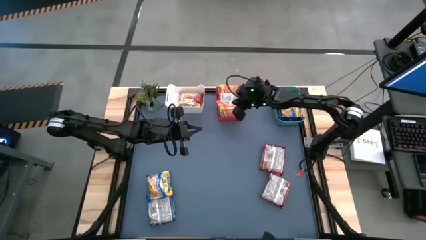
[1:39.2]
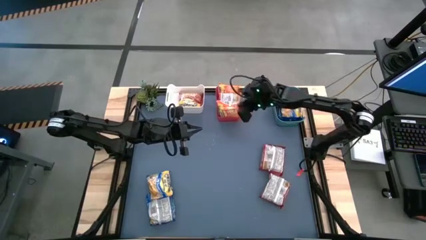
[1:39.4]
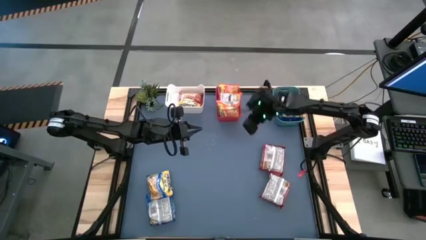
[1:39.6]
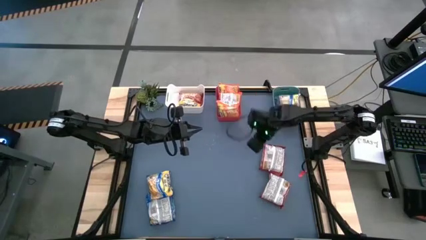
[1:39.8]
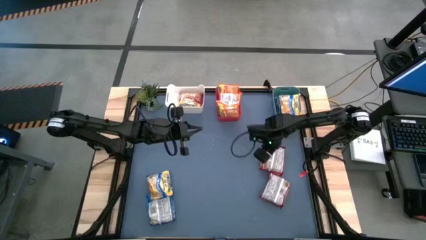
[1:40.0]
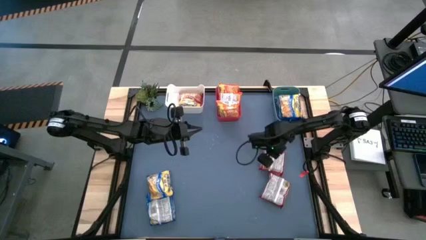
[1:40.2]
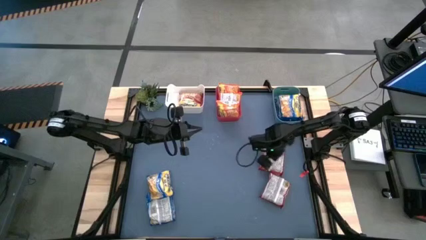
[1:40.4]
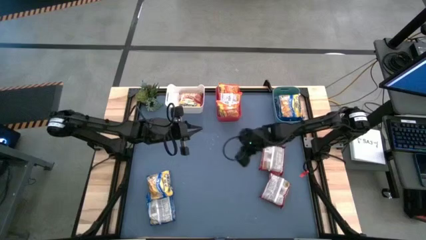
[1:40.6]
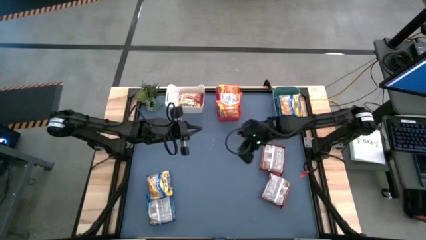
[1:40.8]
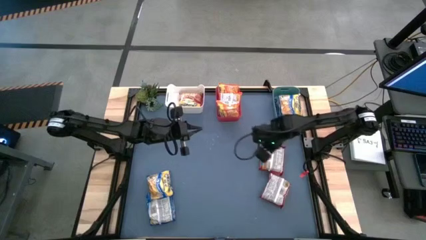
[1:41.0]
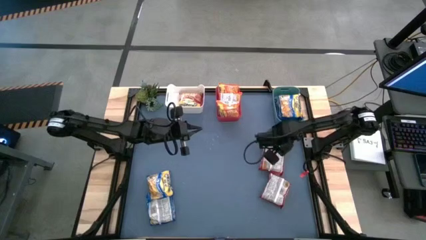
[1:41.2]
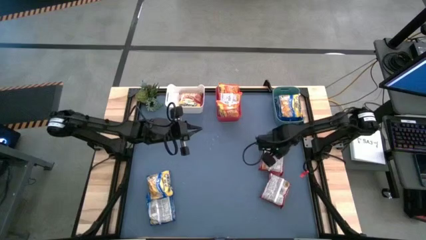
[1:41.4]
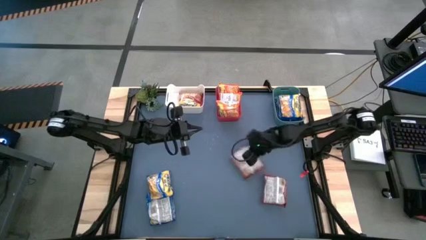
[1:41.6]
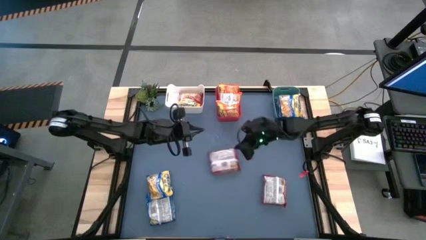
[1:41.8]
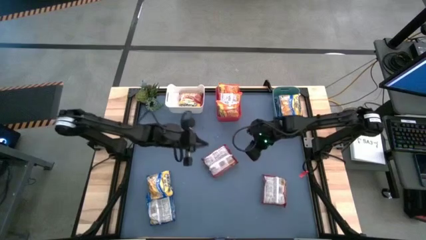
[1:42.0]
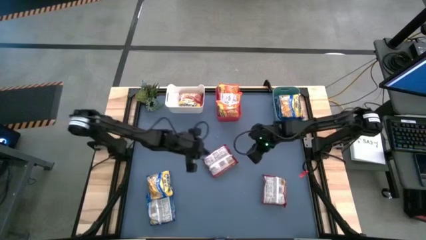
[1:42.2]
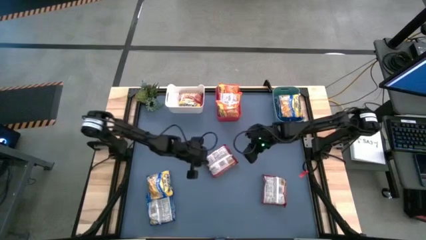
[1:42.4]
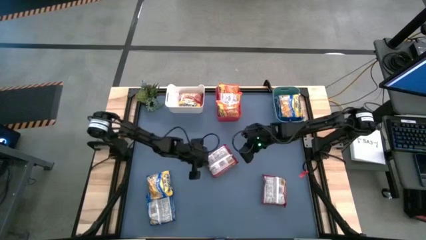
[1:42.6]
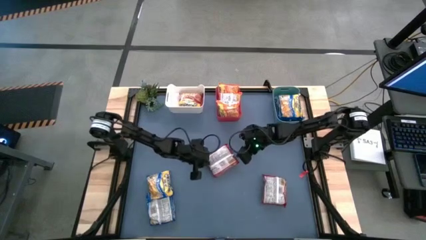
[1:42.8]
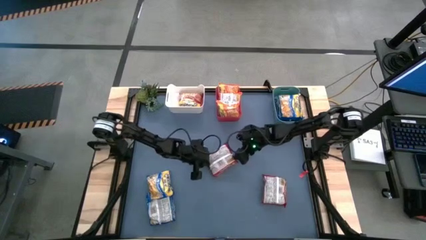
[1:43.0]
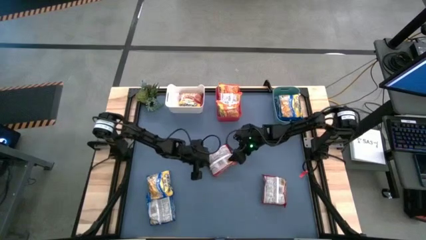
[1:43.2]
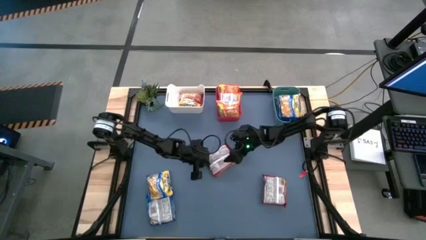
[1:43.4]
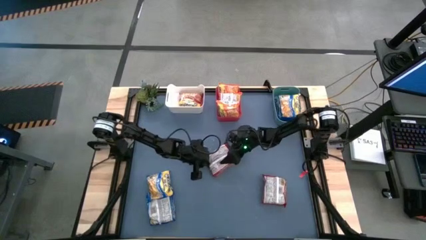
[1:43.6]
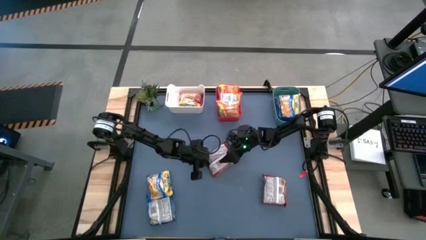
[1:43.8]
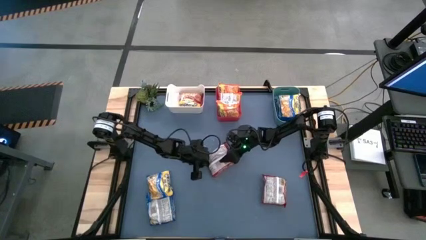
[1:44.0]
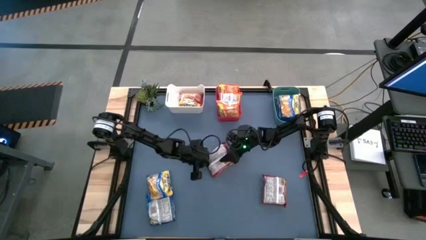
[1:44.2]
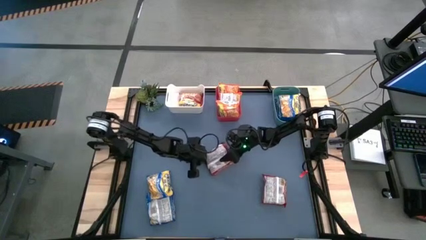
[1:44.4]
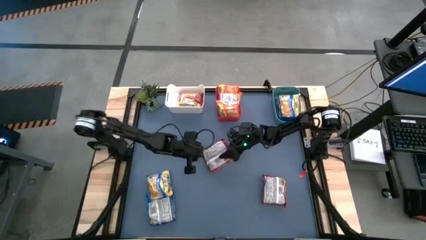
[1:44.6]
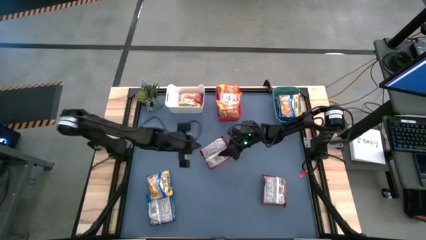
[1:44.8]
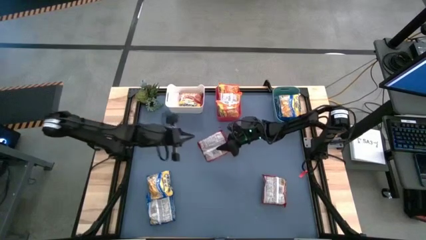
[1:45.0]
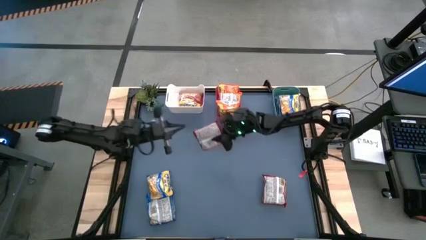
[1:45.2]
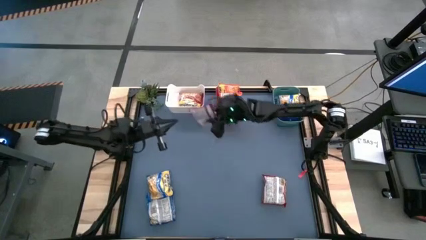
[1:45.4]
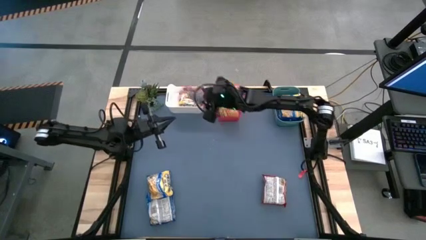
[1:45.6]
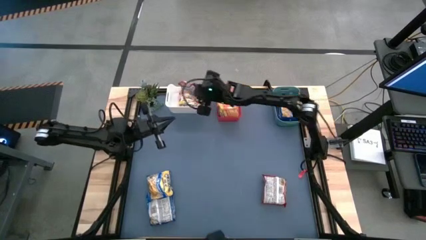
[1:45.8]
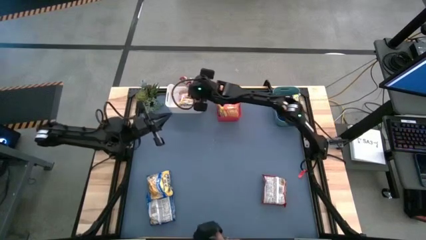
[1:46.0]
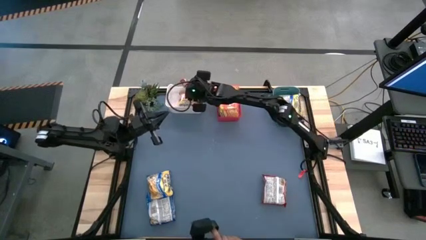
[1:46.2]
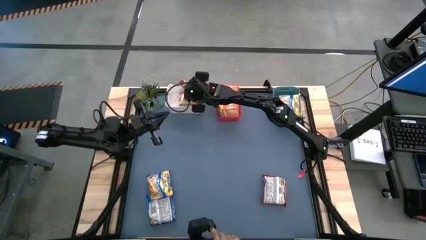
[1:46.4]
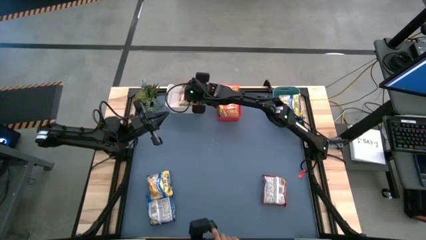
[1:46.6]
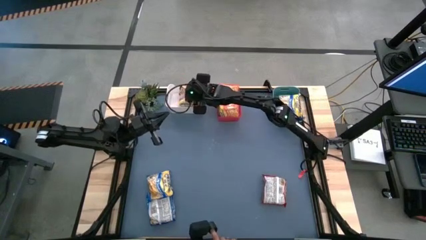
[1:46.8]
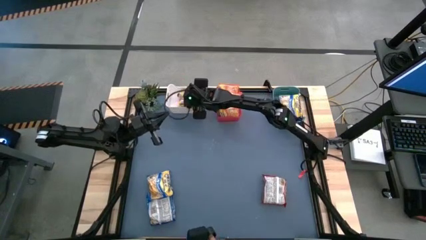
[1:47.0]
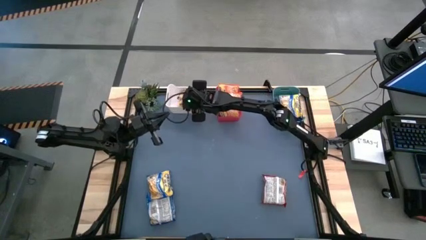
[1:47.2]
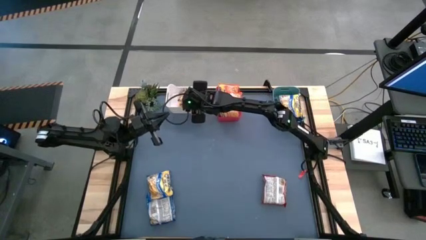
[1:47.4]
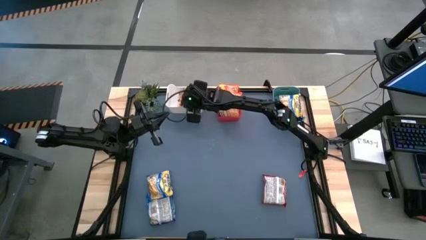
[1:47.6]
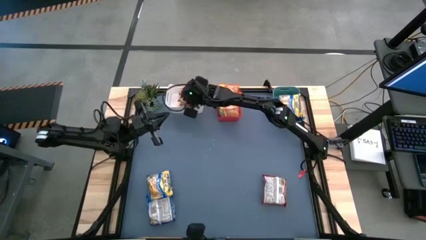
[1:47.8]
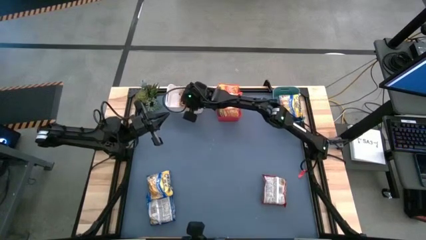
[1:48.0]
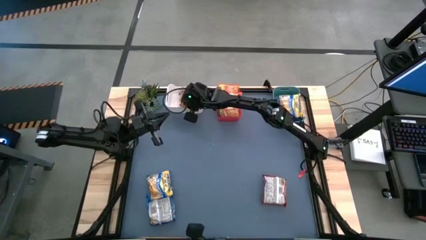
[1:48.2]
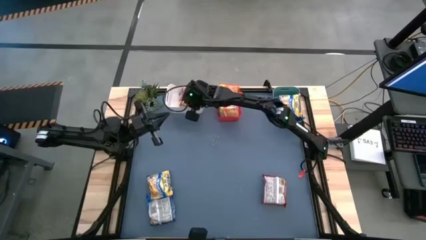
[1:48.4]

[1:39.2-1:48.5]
Task: Sort Maruchan noodles
Put the top red noodle pack into the white bin
